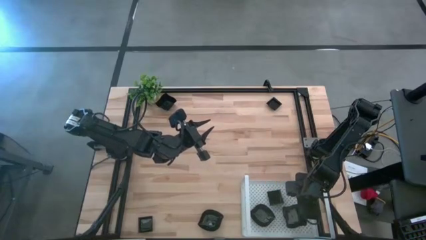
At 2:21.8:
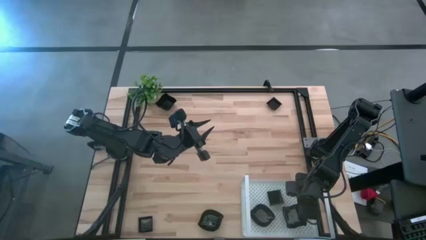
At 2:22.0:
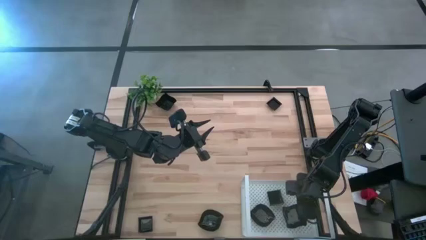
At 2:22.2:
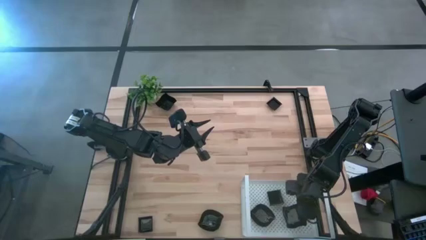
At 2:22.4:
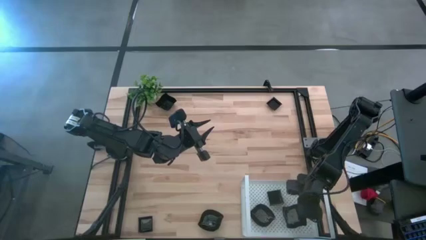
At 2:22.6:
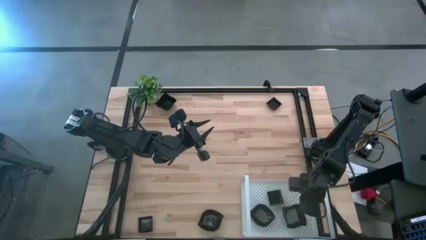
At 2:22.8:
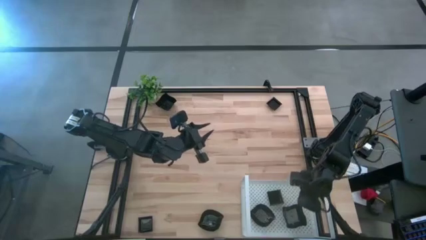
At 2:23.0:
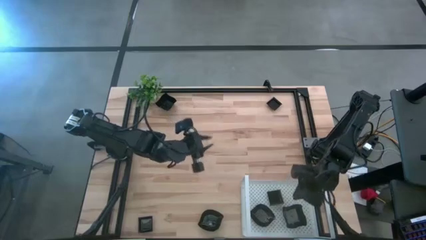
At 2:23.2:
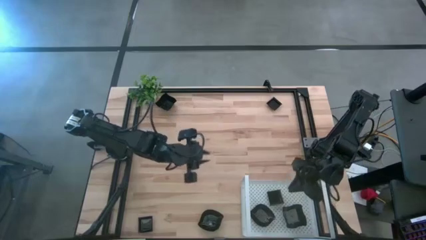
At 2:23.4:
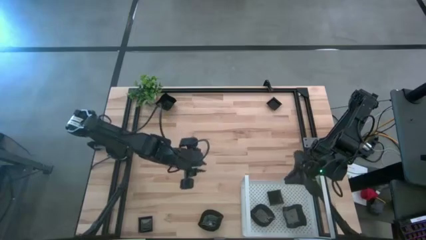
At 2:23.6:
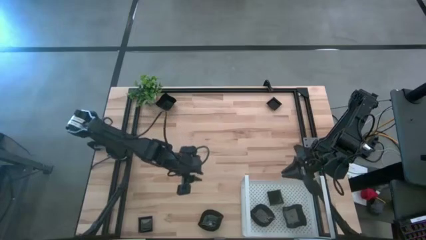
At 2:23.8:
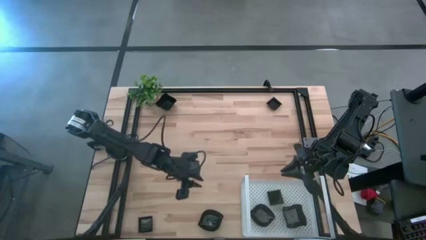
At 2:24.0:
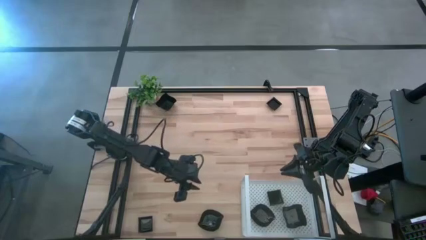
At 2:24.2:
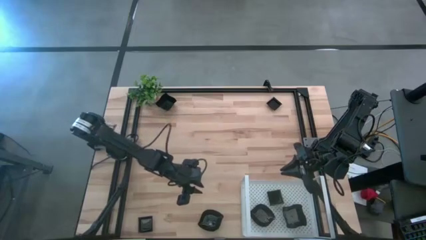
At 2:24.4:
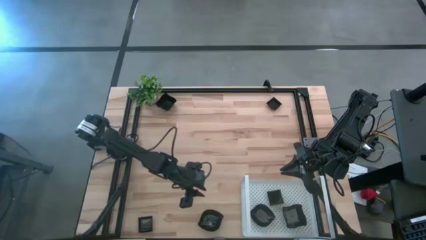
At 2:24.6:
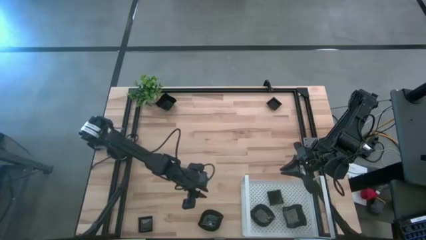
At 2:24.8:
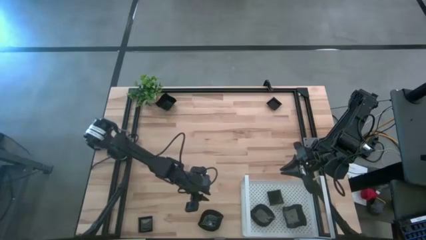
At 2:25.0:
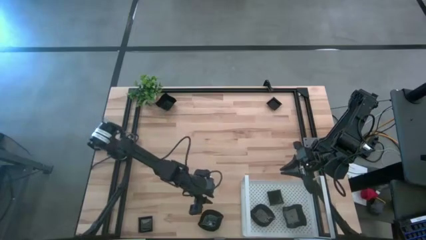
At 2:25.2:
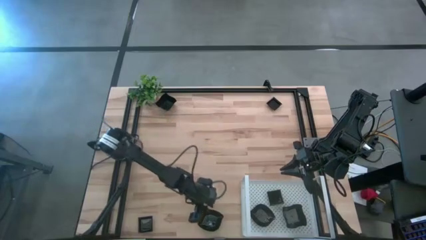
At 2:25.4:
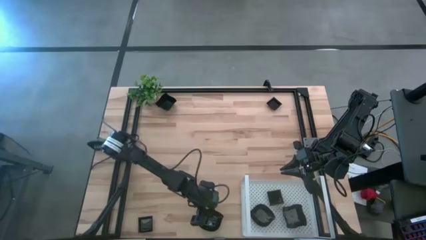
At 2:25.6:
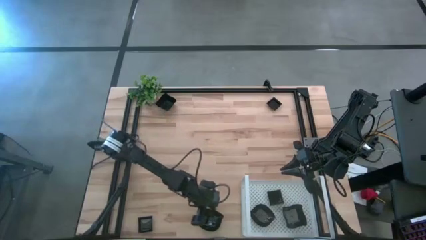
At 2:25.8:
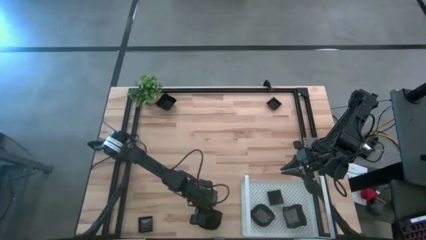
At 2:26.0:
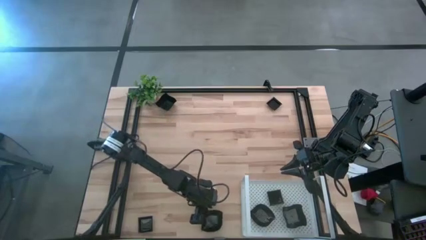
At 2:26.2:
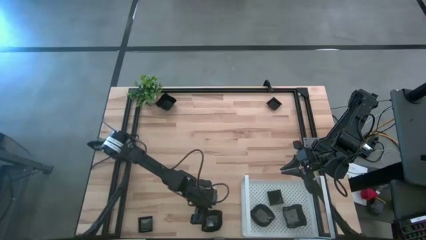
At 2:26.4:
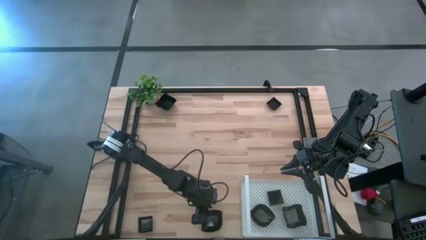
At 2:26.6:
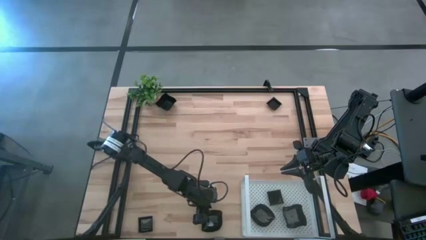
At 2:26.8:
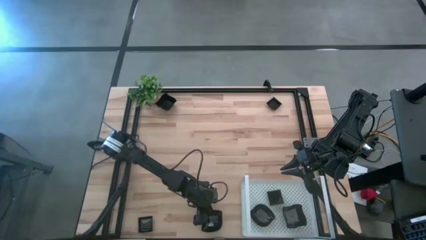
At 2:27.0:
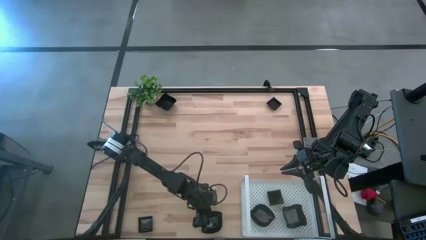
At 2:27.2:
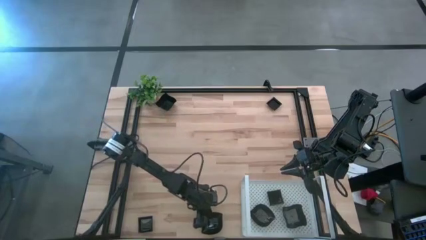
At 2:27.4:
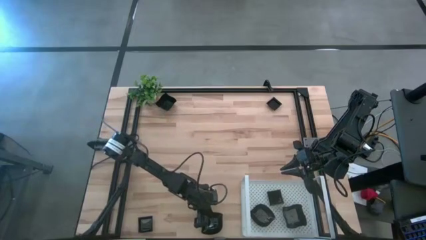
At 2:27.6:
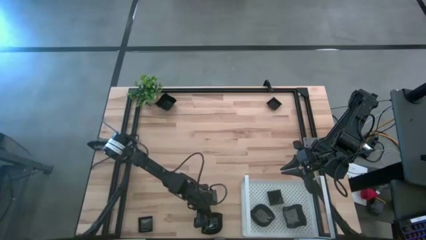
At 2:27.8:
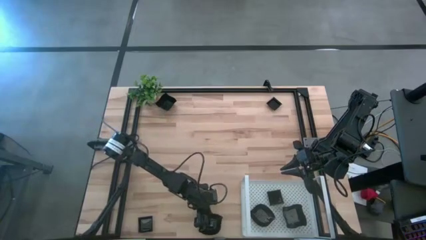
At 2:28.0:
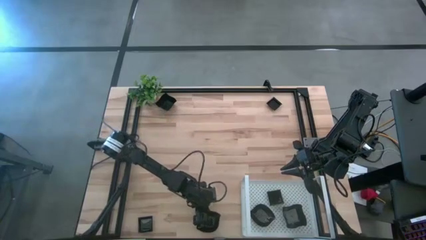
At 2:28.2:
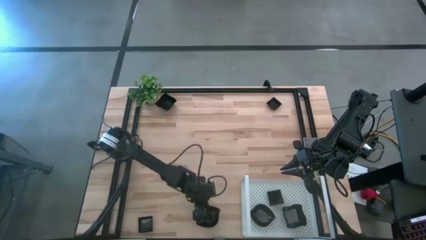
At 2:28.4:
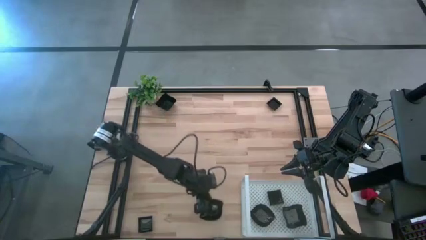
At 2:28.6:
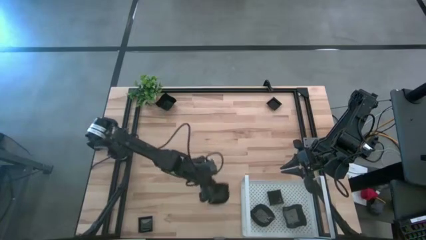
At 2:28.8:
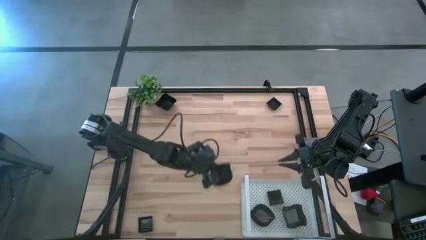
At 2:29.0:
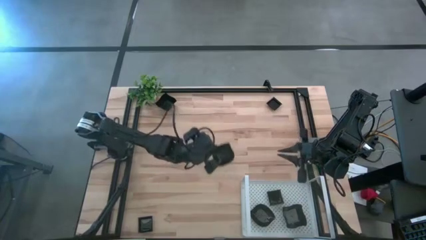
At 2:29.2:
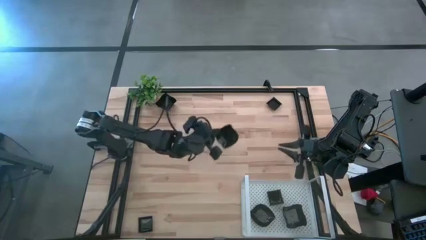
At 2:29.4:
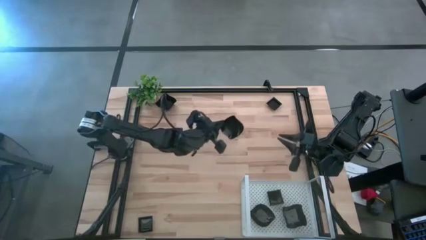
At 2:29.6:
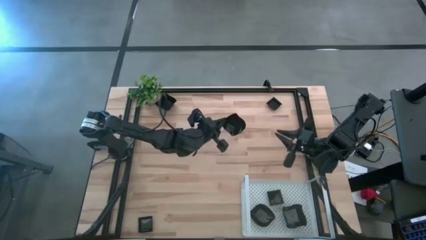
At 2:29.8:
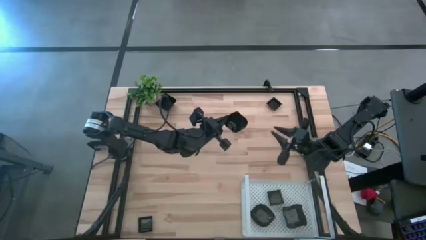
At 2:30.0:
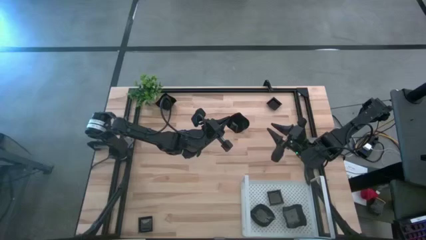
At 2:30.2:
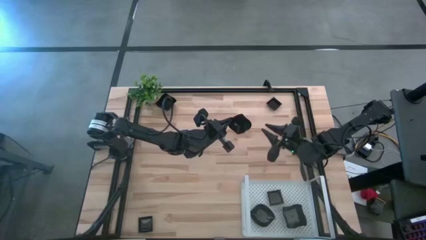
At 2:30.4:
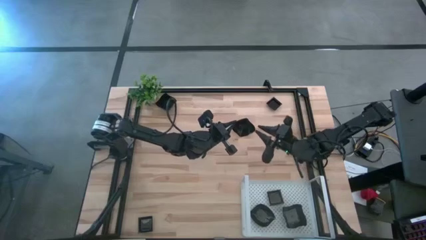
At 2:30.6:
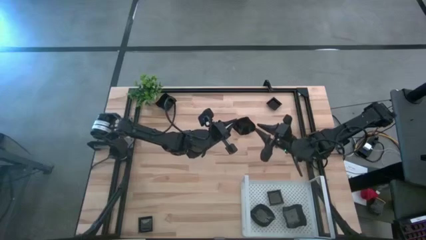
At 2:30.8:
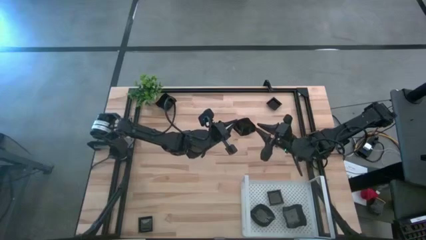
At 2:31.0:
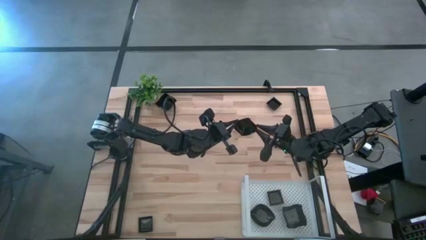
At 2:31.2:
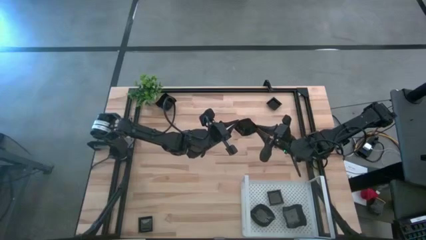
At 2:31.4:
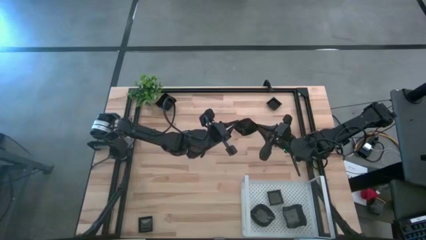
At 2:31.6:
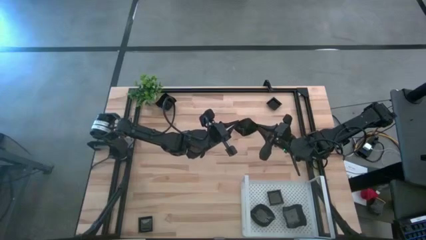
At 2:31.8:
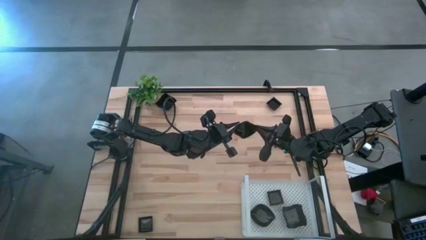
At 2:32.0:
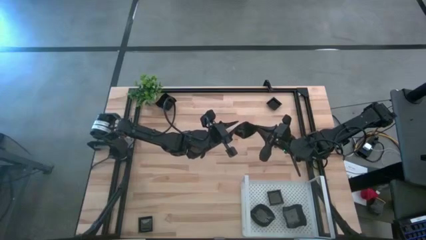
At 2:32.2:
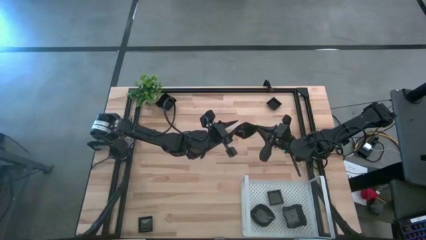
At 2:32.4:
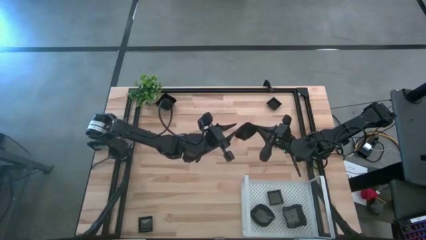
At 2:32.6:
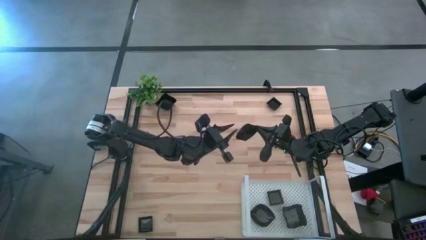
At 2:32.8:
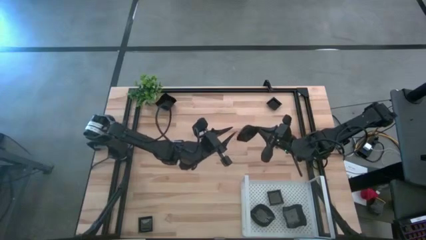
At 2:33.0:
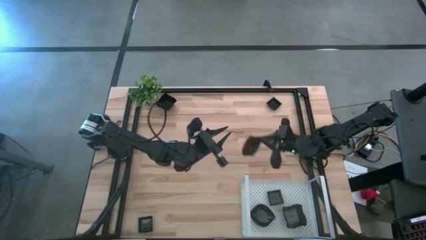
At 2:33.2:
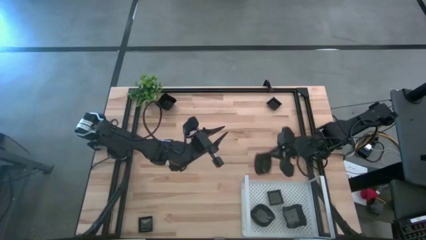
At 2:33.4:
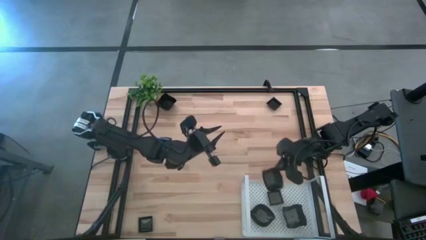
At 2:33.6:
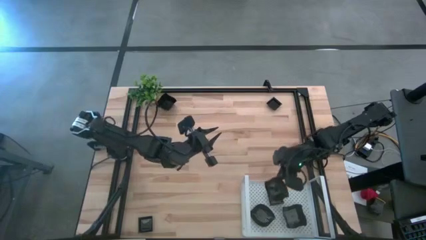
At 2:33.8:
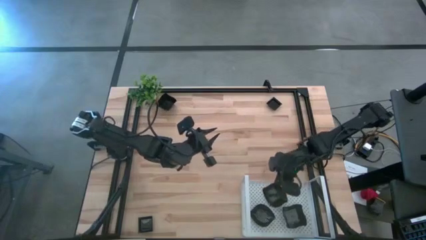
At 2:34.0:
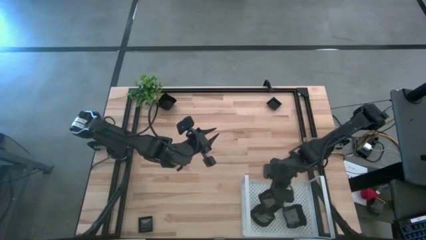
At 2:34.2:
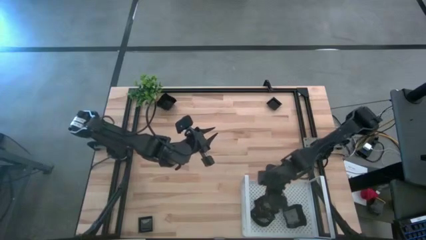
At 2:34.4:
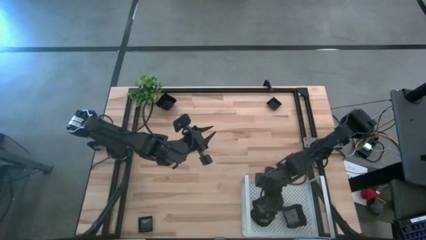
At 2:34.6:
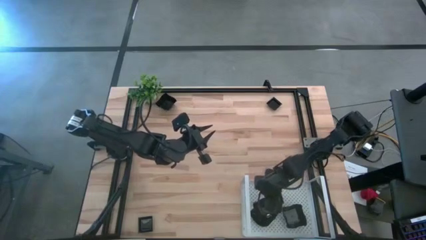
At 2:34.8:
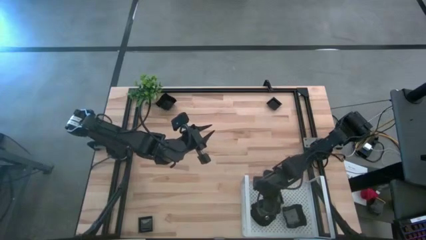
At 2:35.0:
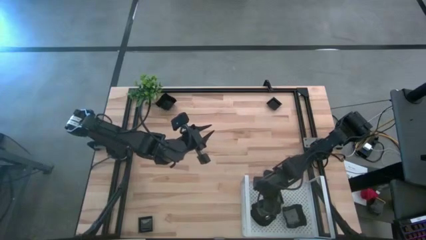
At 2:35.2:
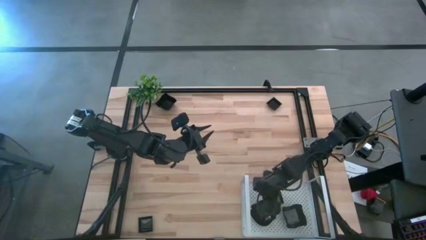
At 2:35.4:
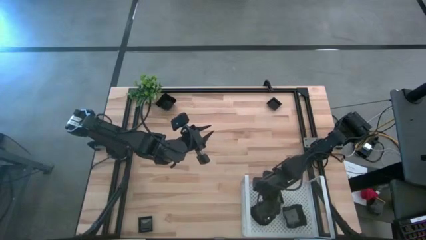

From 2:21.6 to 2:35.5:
Task: Pick & Place Mini shaped plates
Stack the leaf shaped plate on top of the other leaf shaped plate on the shelf

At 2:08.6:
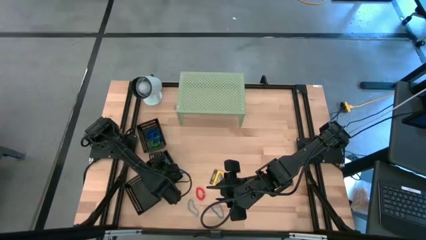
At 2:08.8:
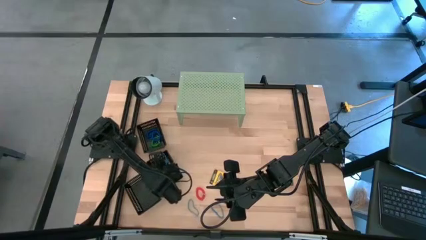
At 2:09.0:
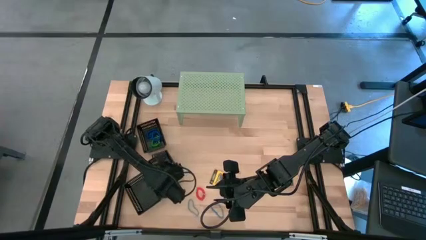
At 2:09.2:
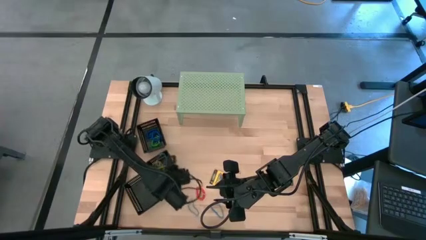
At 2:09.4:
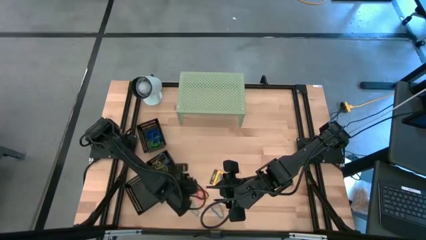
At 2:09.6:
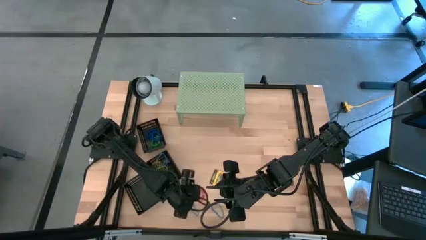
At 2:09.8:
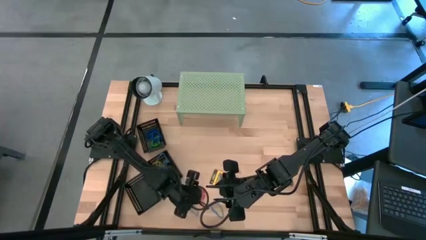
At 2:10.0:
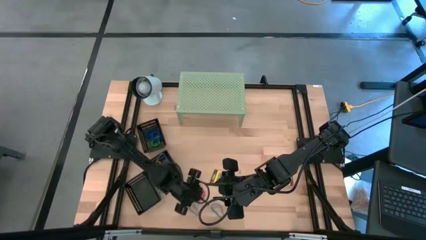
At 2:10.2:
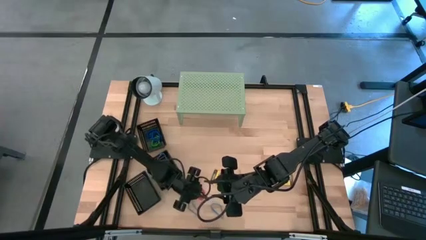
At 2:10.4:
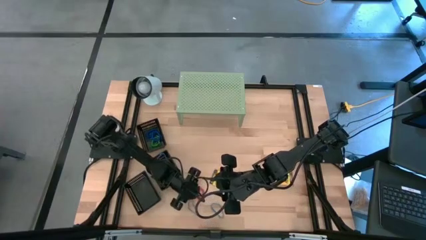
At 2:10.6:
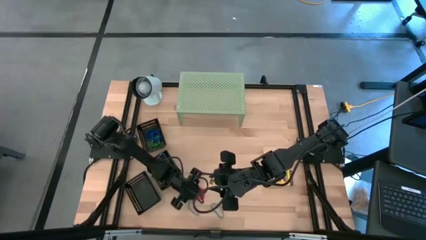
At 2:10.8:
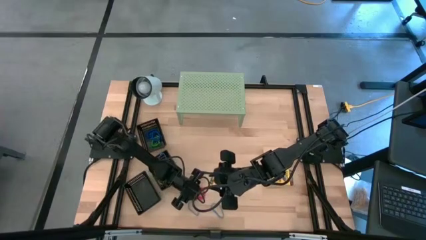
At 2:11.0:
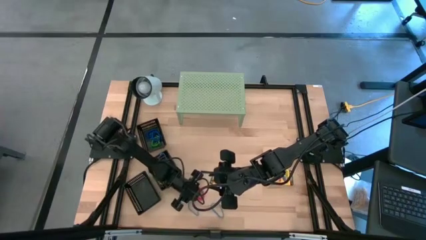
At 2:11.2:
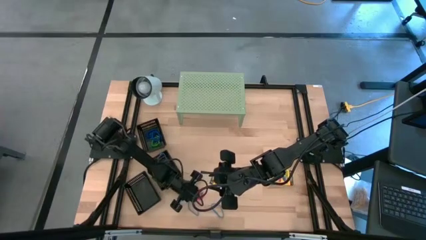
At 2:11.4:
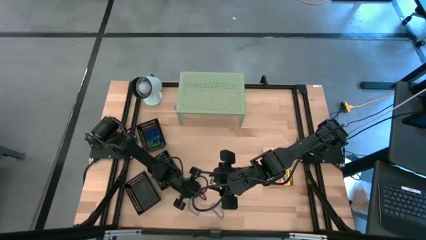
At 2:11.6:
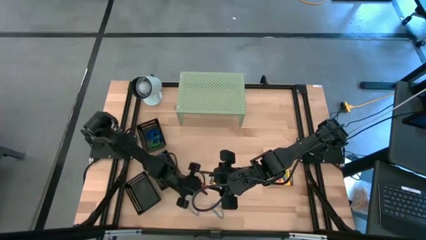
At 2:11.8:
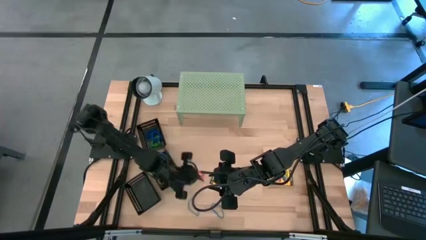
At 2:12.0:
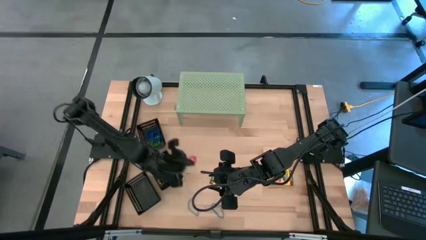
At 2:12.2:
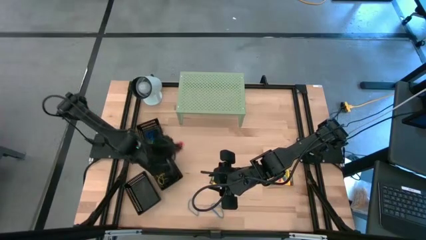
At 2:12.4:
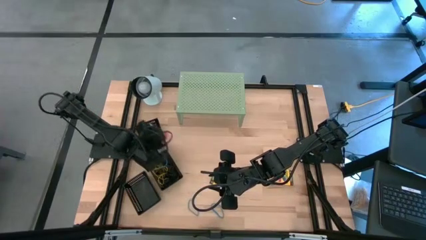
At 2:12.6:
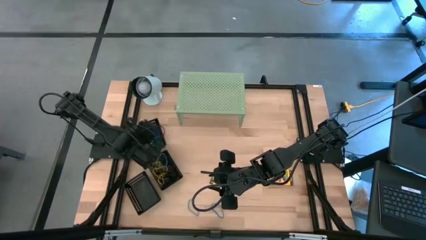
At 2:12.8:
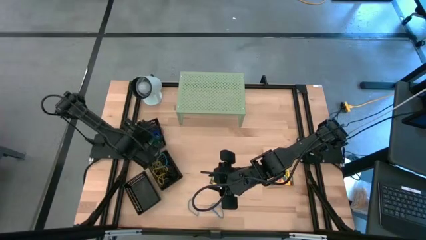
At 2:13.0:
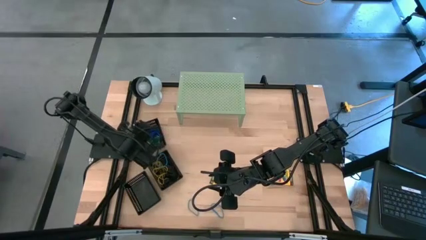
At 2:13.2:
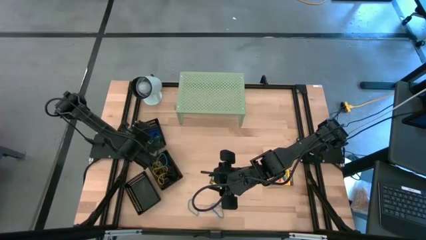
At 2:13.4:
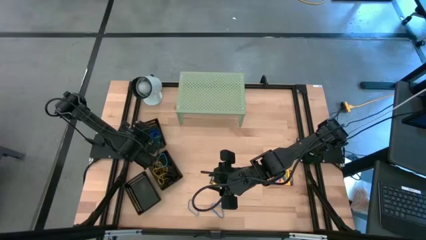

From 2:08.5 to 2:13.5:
Task: Pick & Place Office Desk Supplies
Put the red spring rubber band into the top black bin
